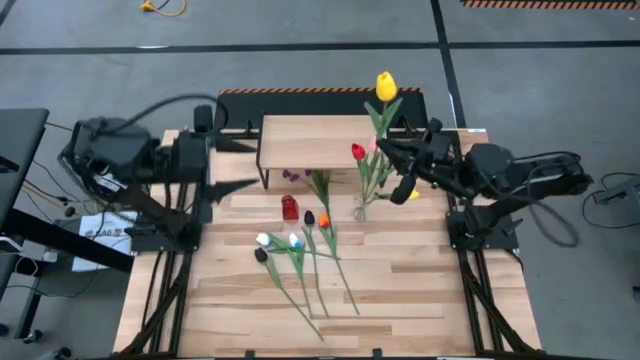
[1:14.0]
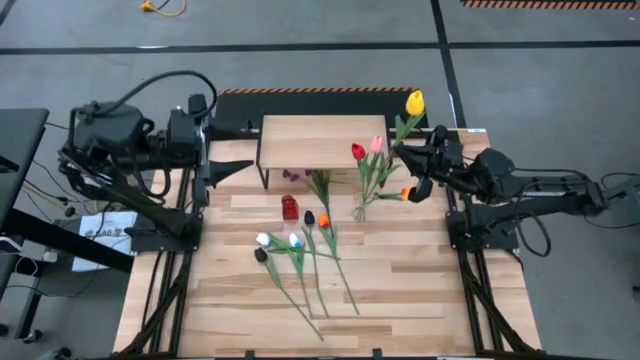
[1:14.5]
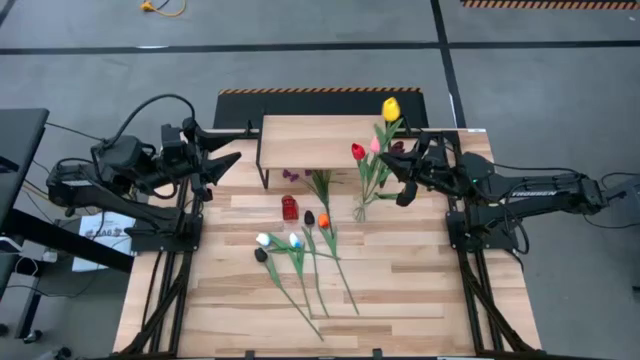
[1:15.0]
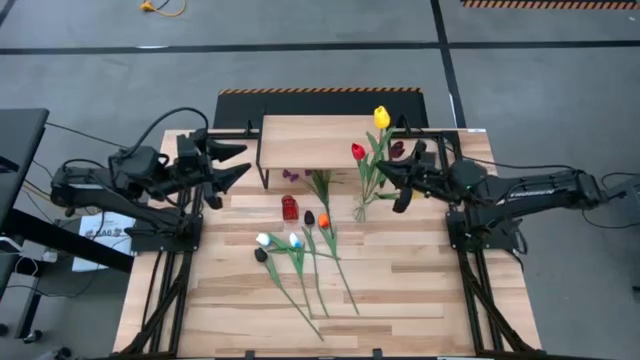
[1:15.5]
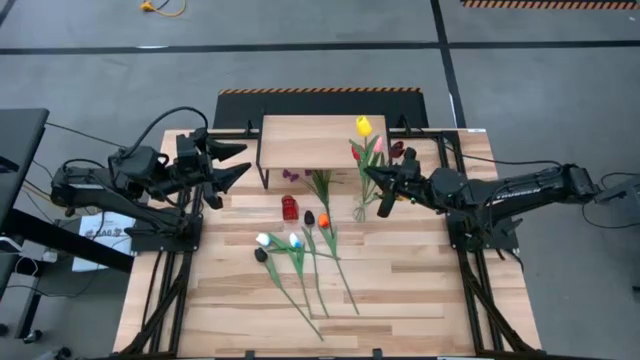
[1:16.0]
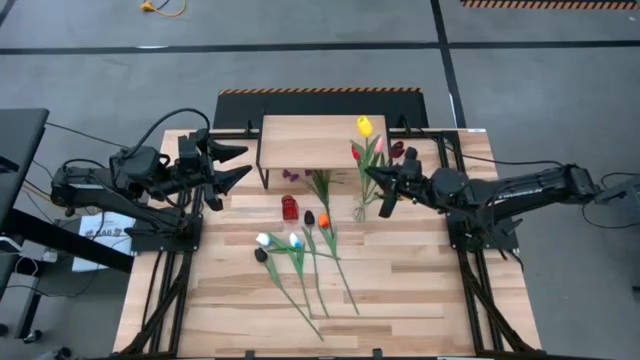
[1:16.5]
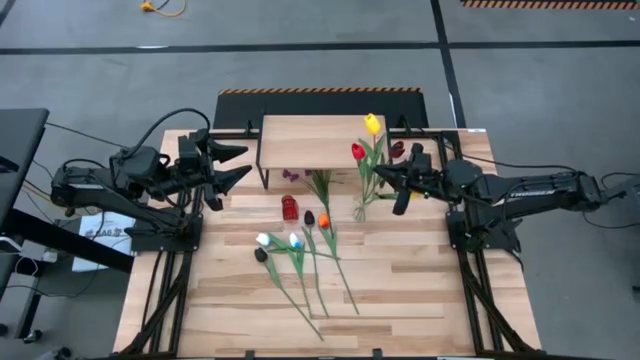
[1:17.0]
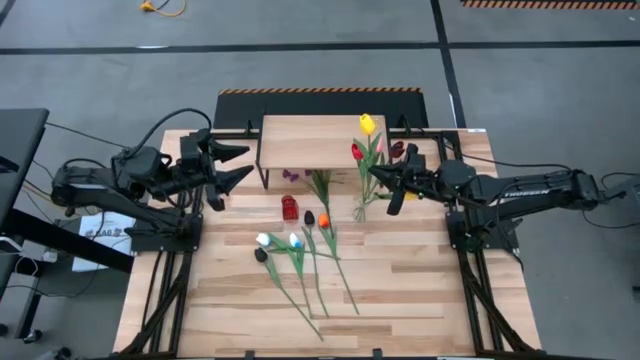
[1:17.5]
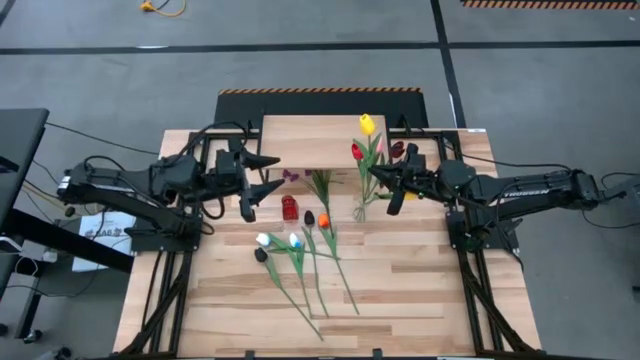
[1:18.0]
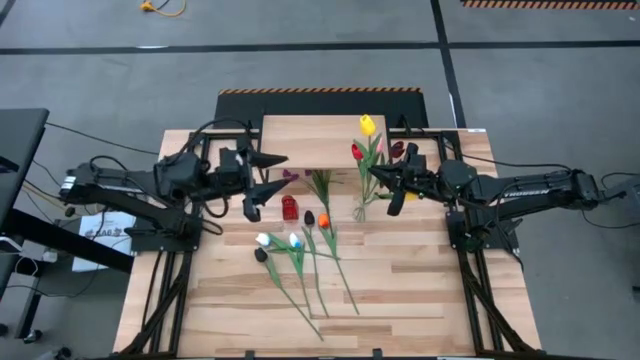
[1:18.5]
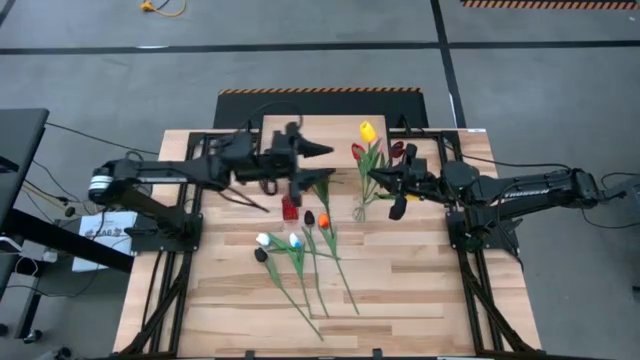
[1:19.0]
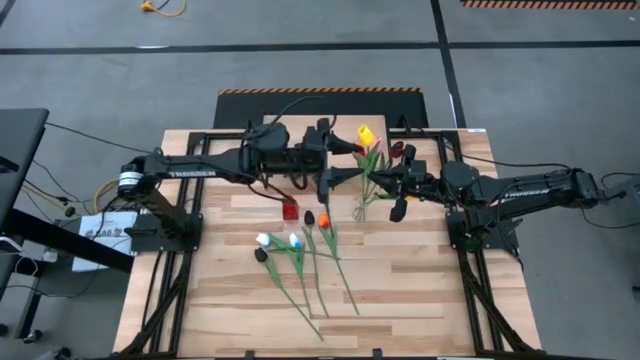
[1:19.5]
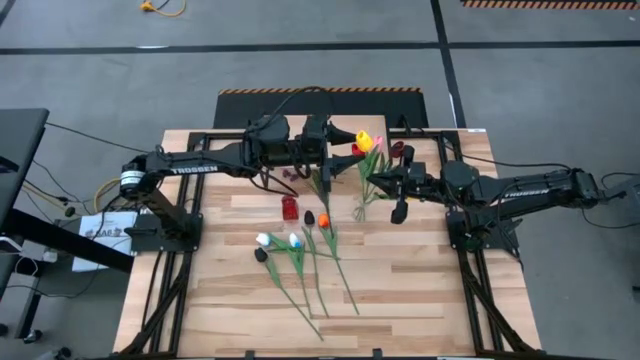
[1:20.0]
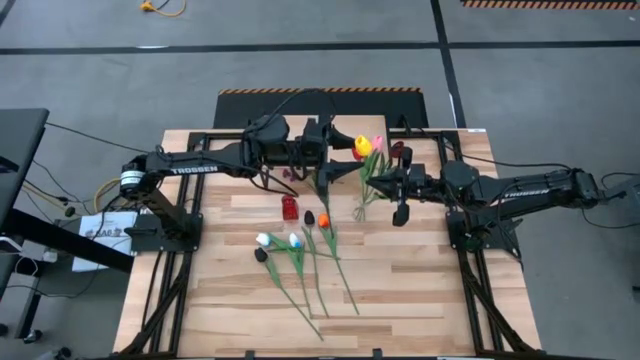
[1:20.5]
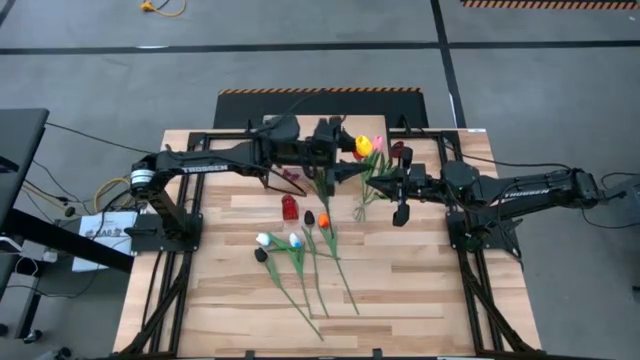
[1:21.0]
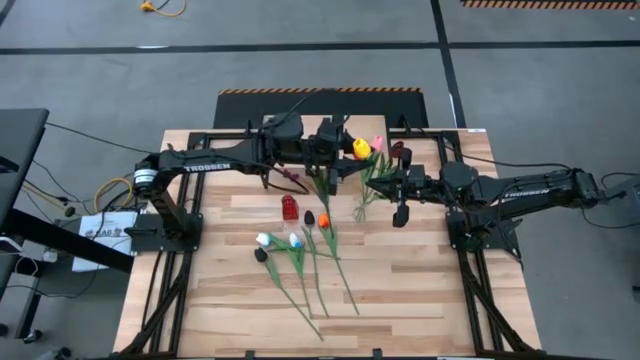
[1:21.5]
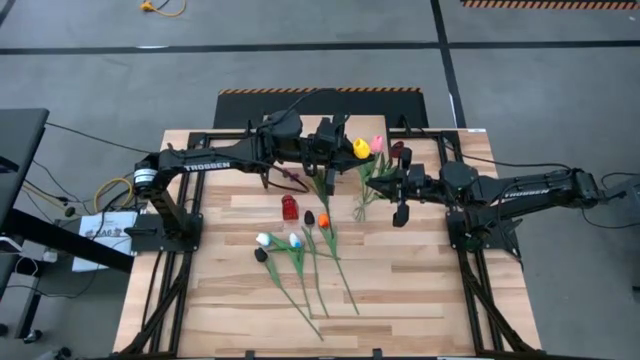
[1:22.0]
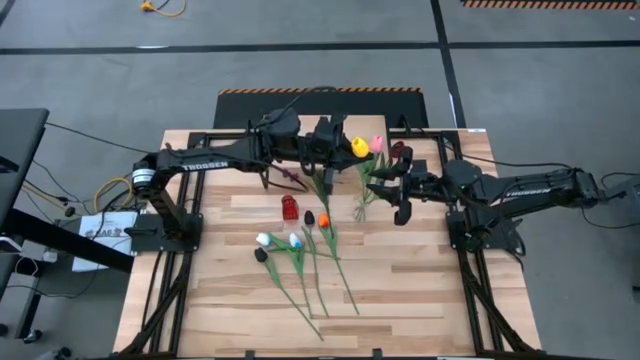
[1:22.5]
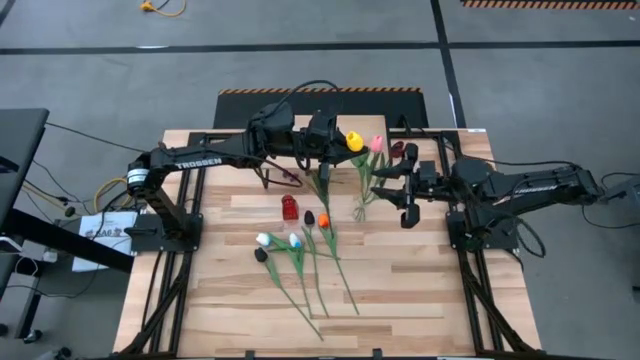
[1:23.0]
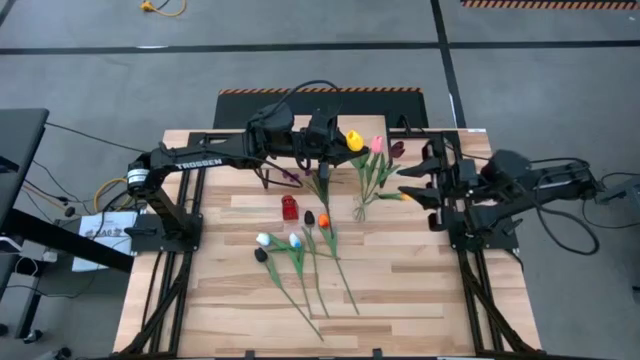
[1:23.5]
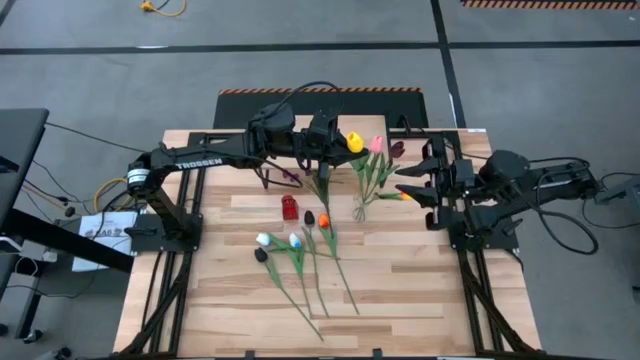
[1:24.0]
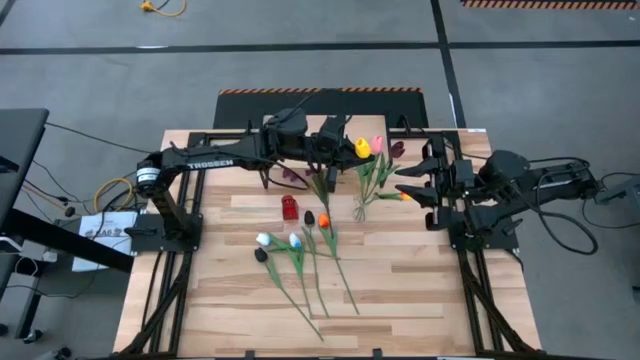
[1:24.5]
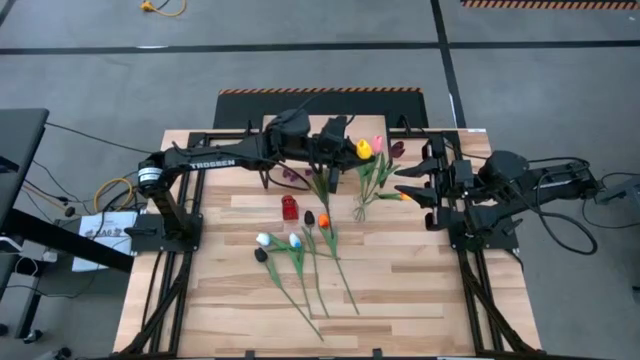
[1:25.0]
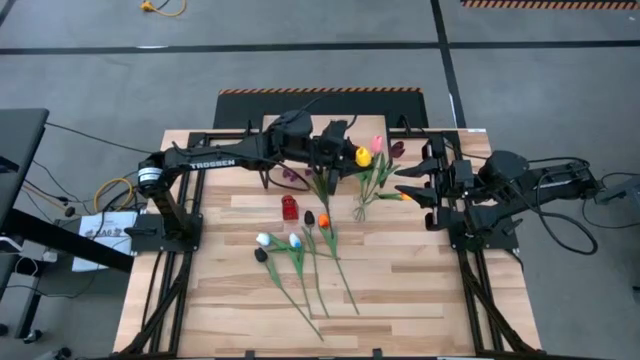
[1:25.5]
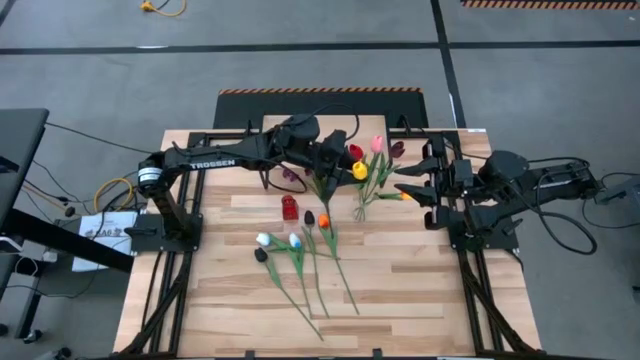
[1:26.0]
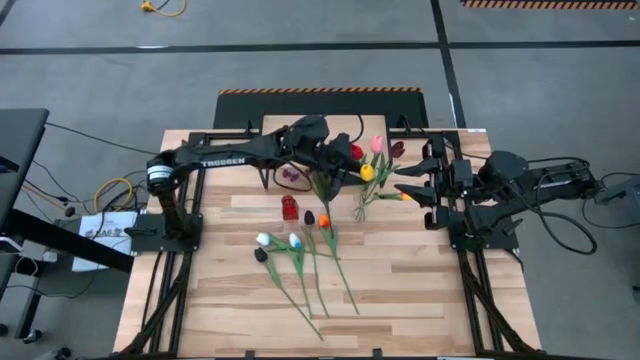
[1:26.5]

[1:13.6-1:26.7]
Task: Pick and place flowers into a vace then onto a shelf
Put the yellow tulip into the transparent vase

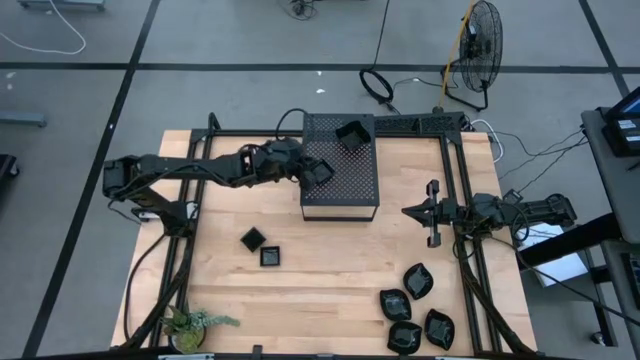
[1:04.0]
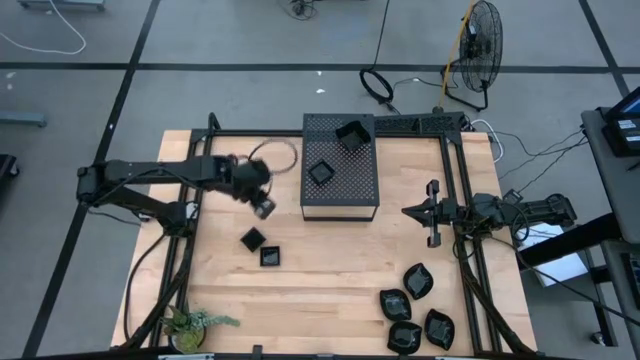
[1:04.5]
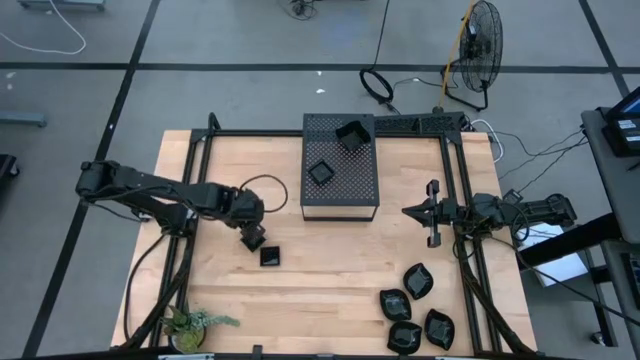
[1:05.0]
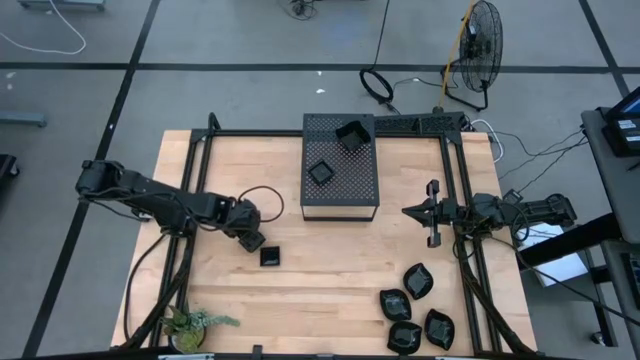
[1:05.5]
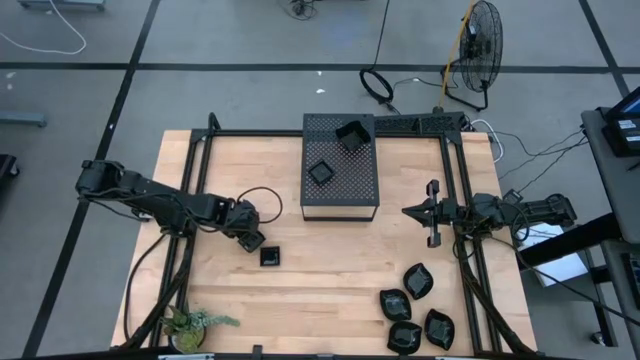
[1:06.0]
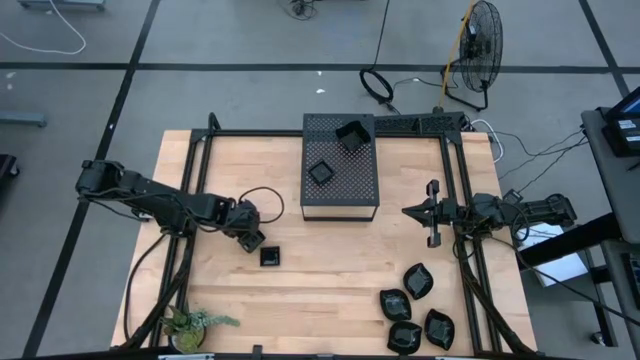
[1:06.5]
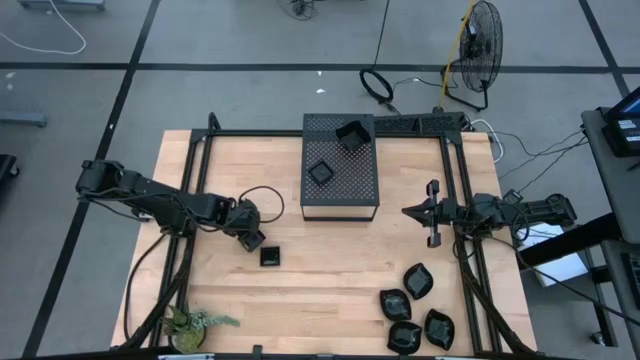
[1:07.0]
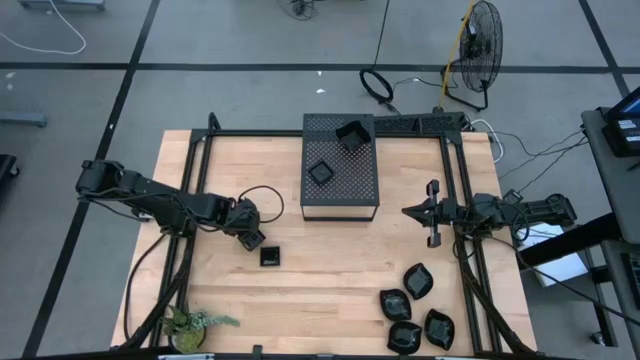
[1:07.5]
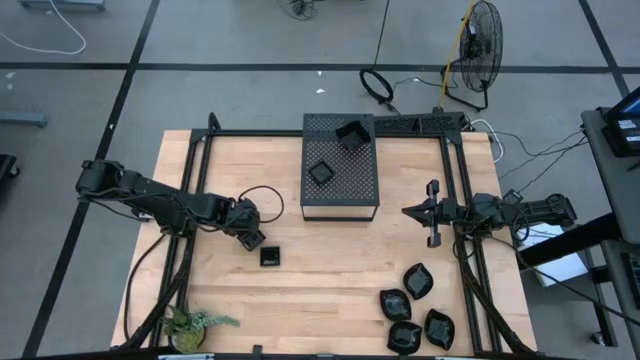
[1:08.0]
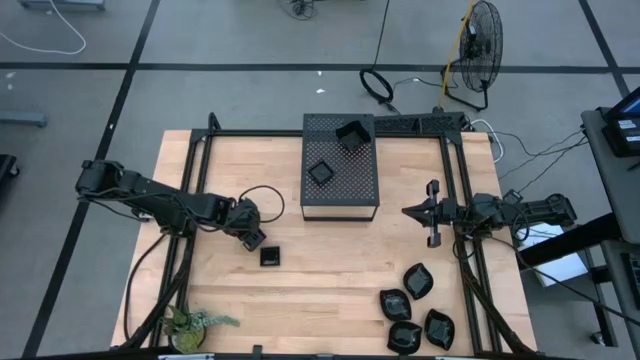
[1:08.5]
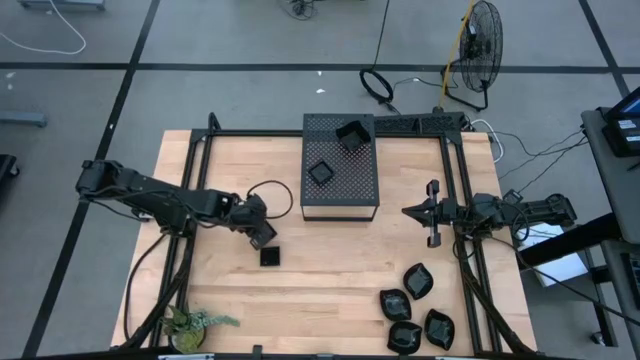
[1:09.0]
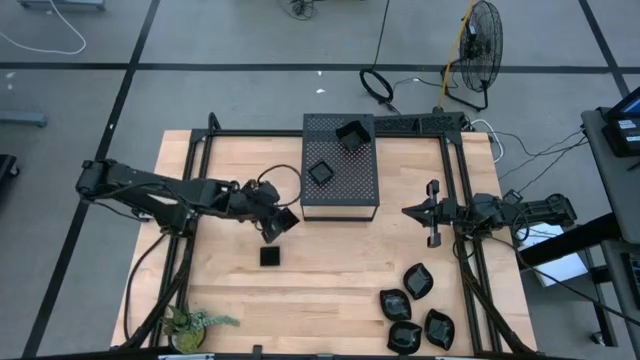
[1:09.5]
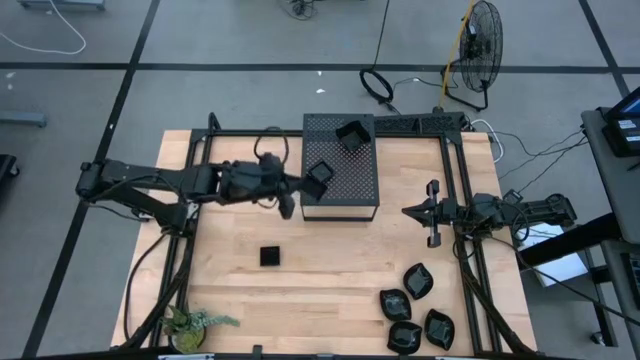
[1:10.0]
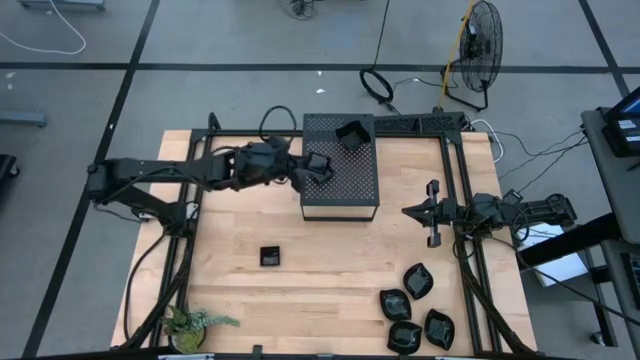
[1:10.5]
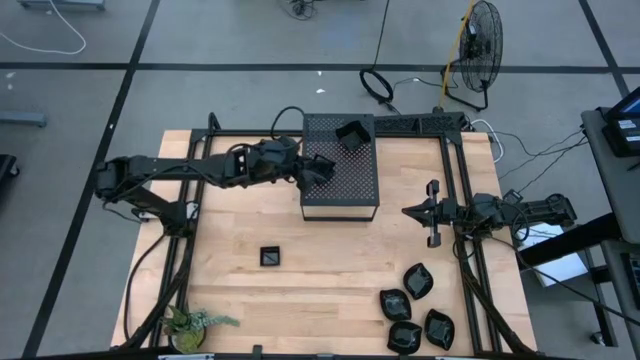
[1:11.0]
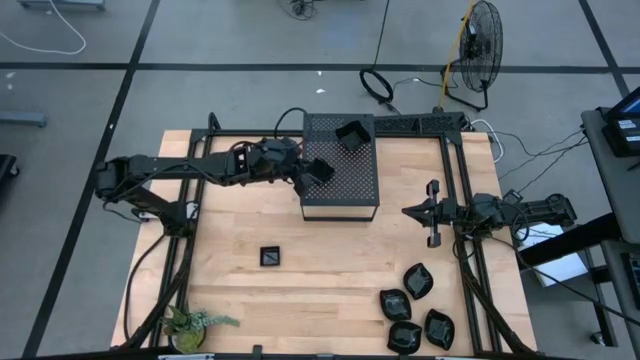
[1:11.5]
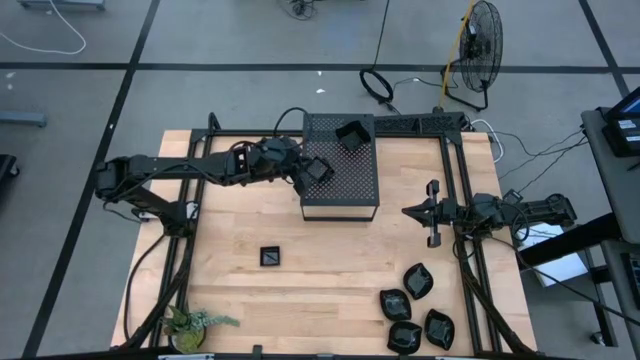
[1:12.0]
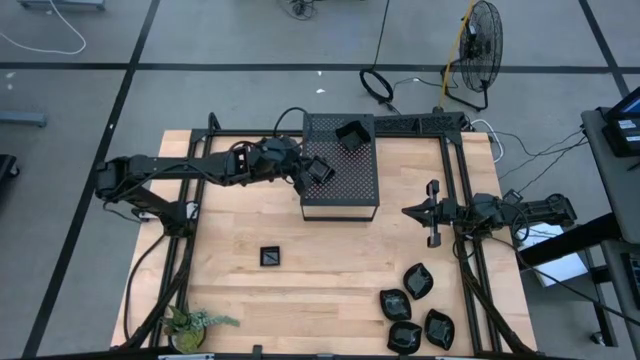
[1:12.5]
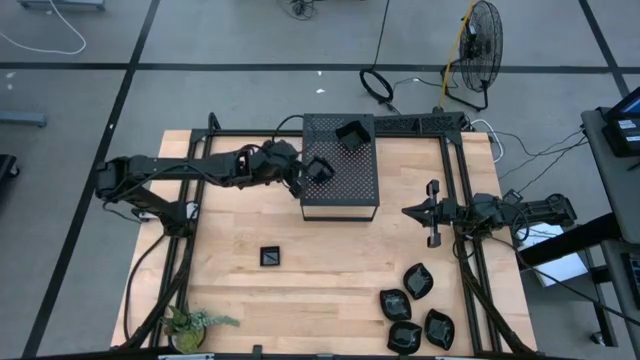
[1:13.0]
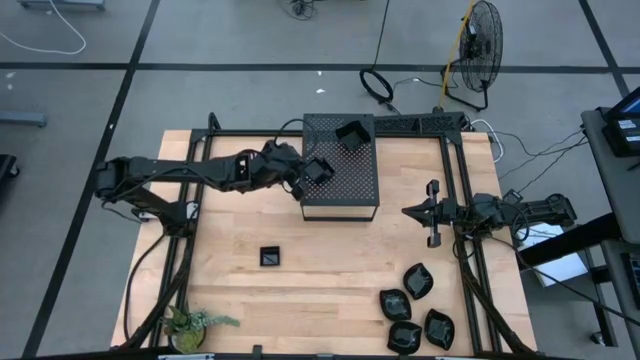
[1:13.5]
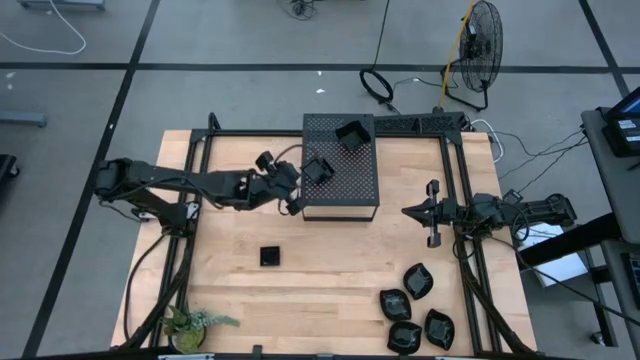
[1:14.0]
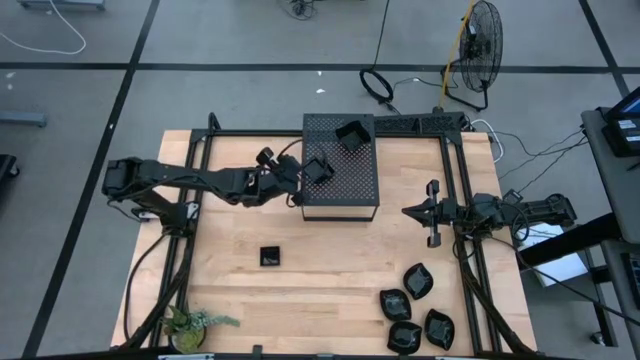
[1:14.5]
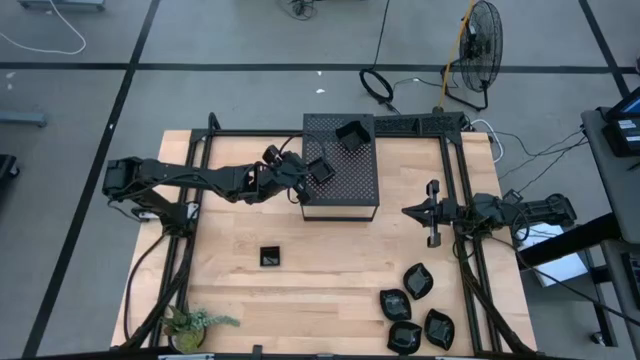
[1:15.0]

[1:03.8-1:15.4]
Task: Pick & Place Mini shaped plates
Stack the square plate on top of the square plate on the shelf
